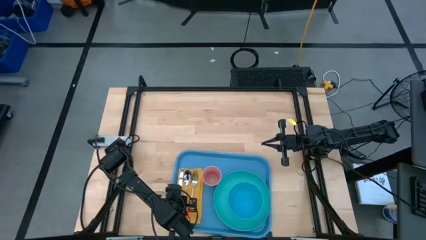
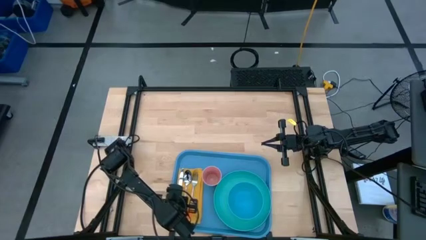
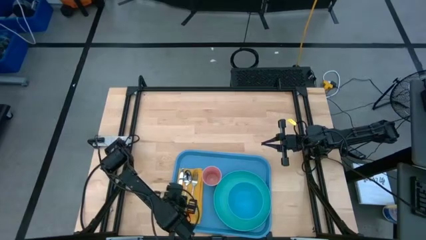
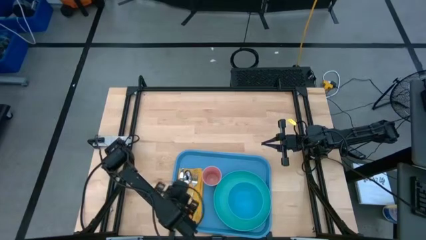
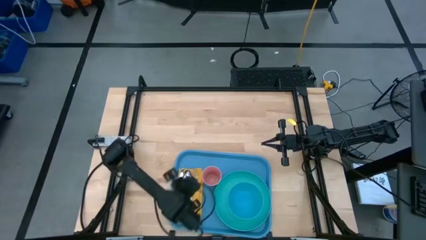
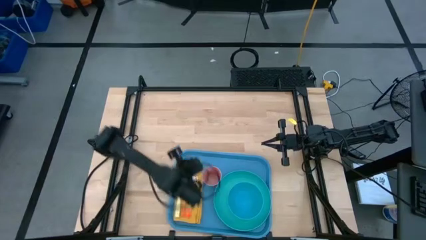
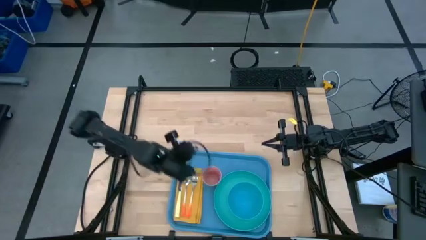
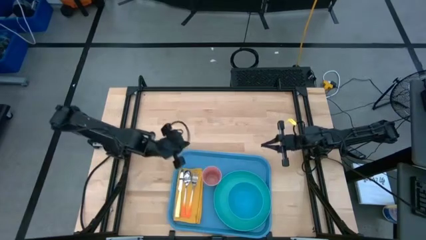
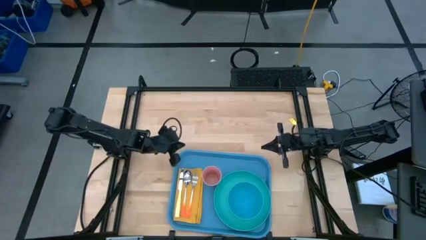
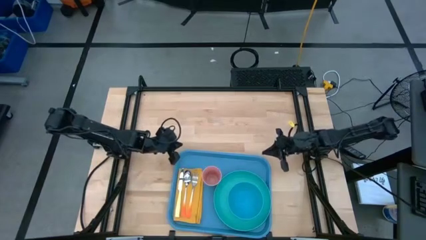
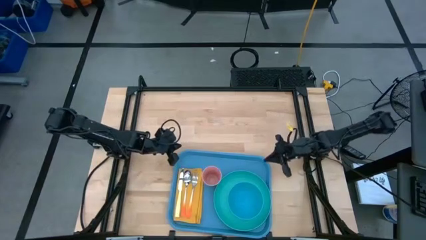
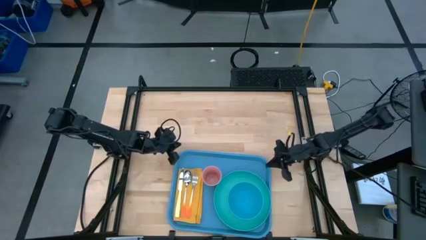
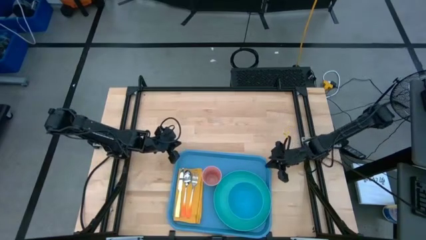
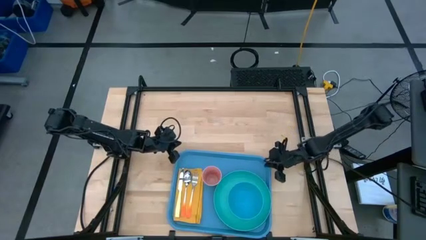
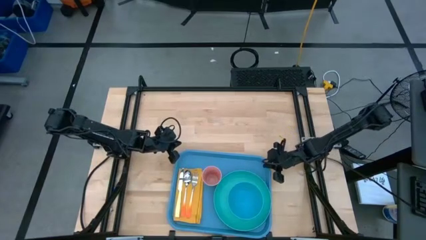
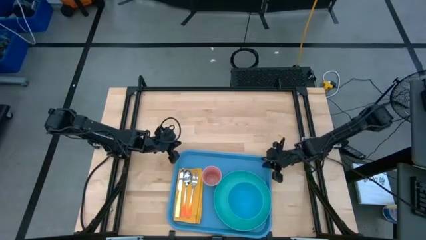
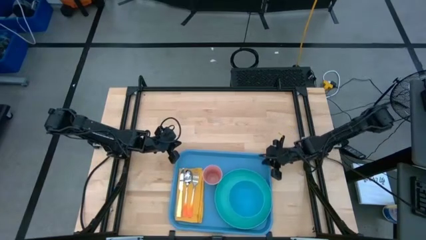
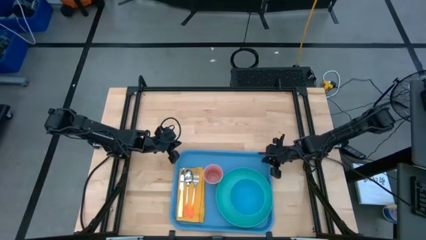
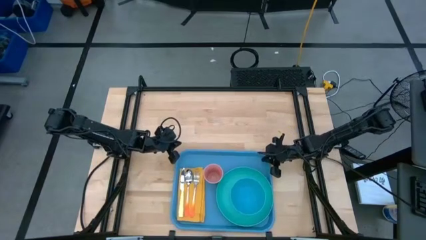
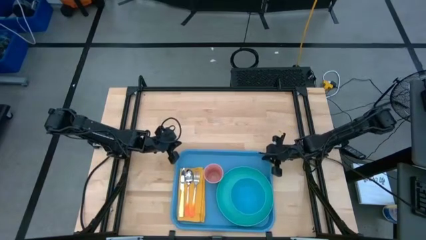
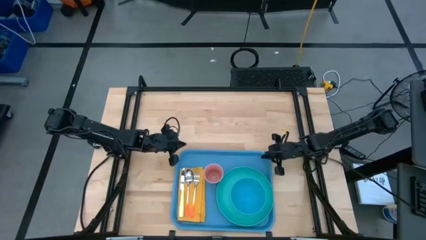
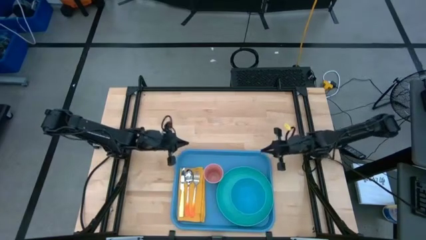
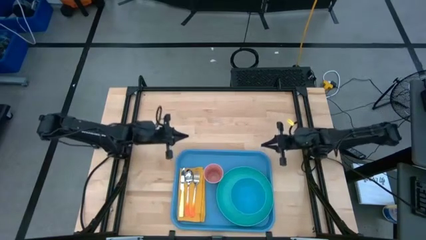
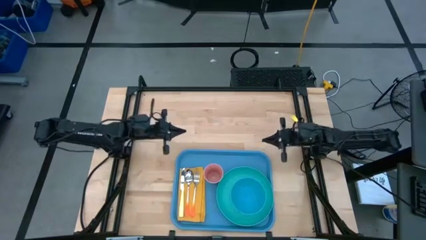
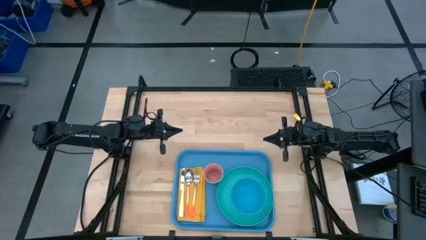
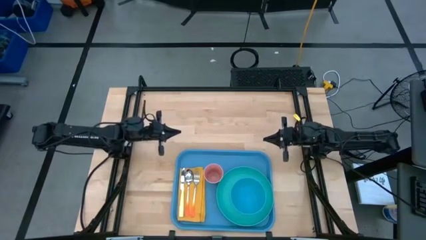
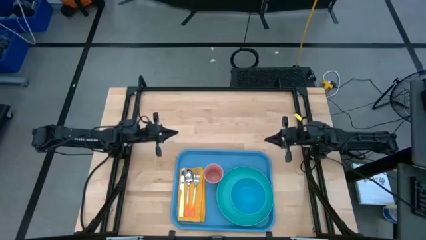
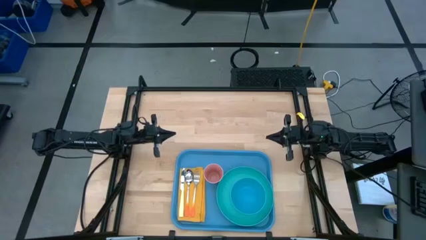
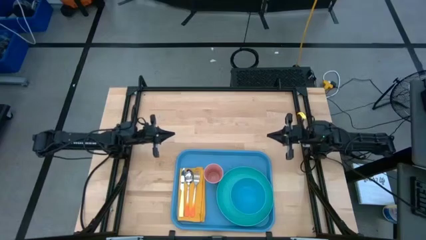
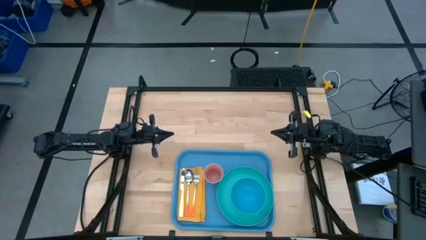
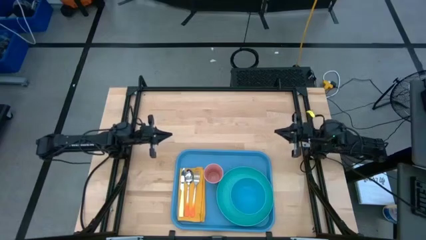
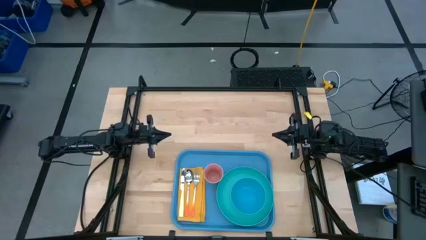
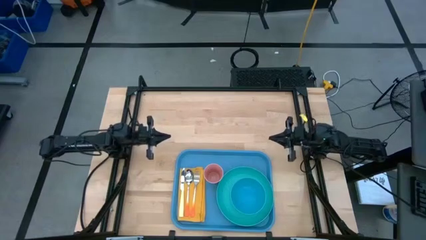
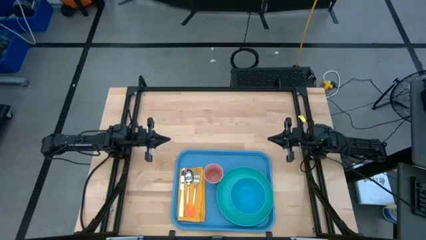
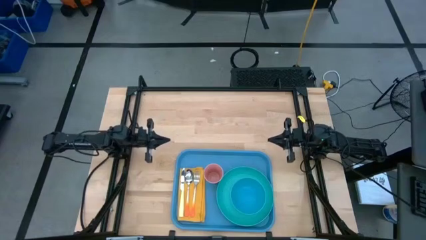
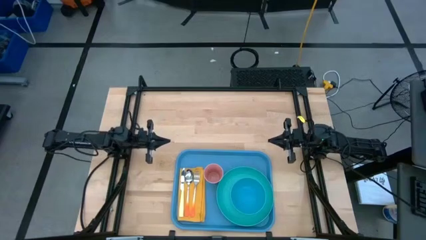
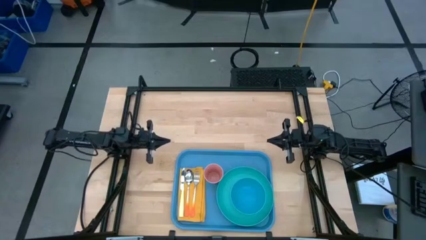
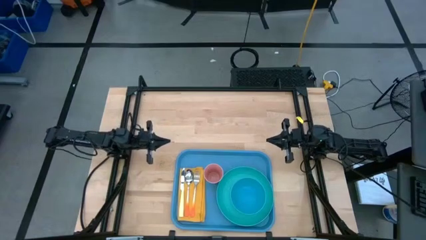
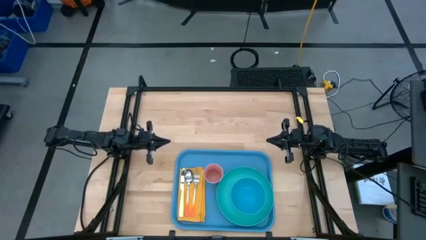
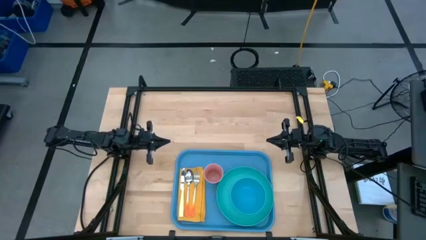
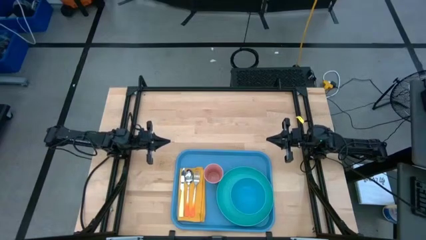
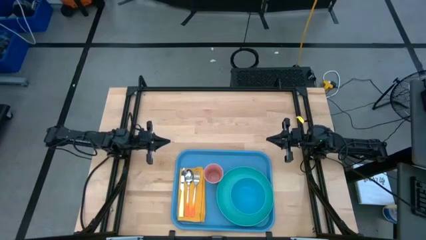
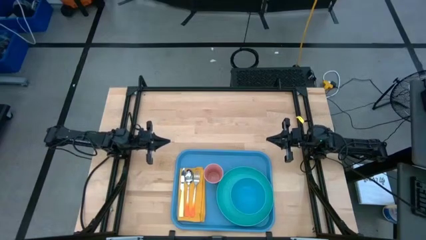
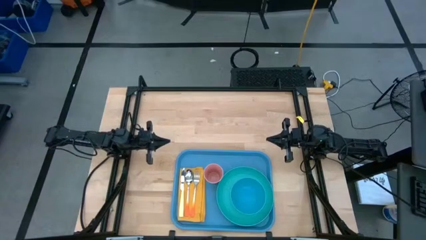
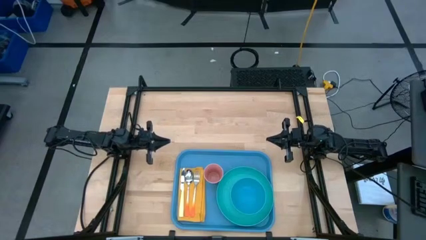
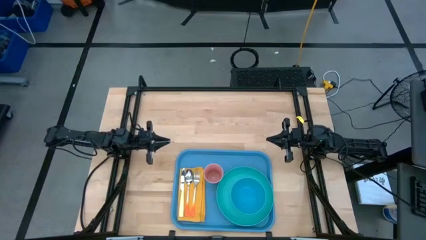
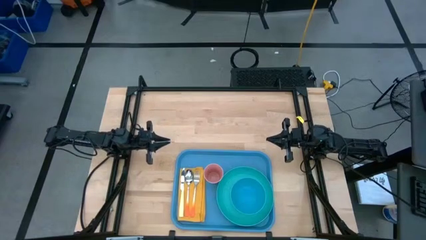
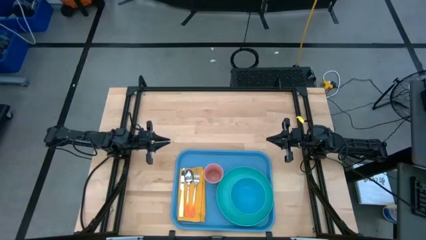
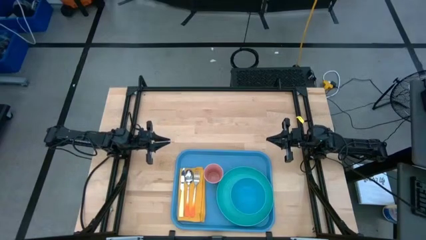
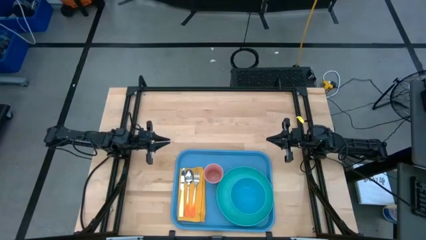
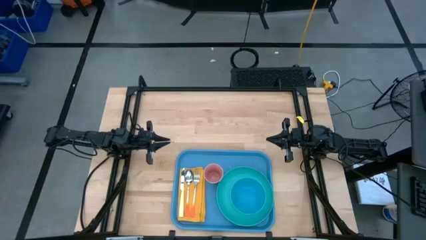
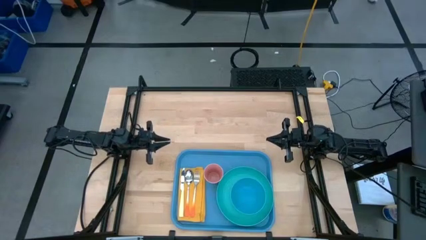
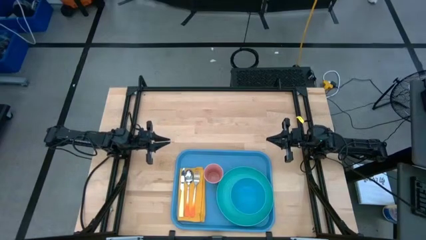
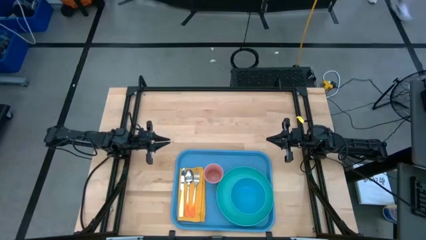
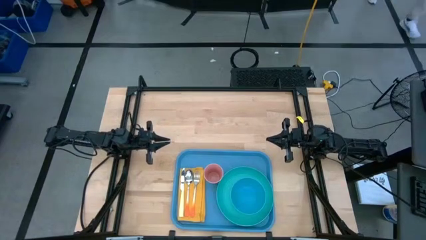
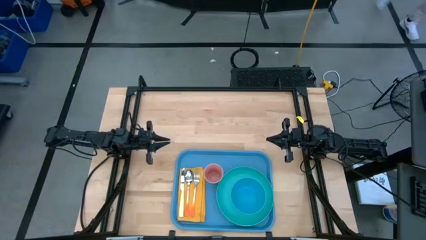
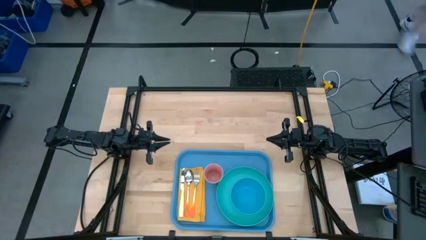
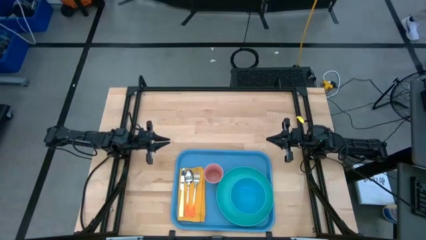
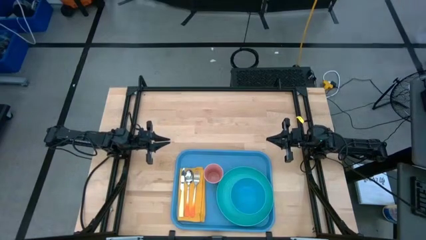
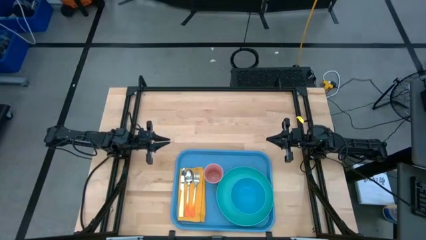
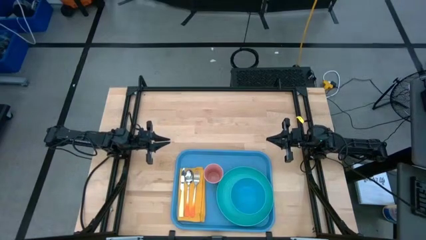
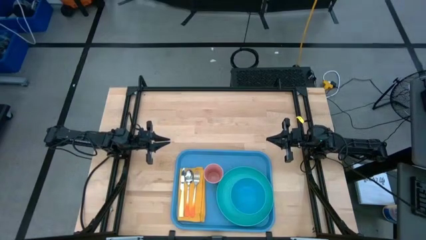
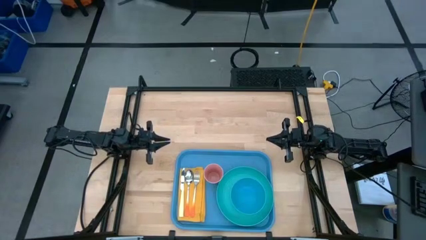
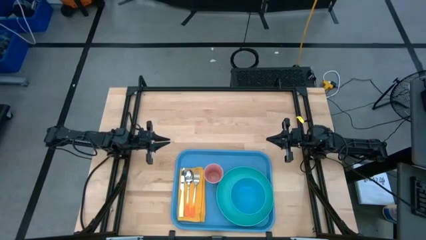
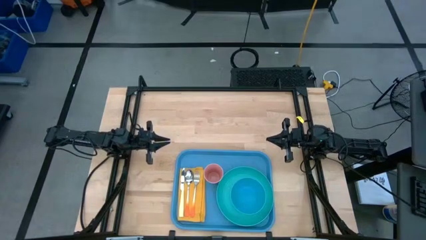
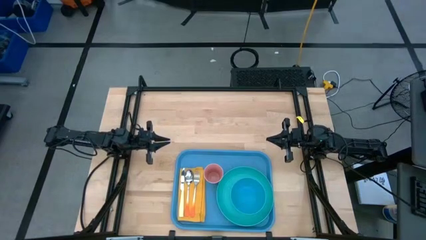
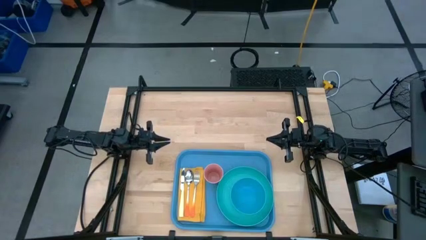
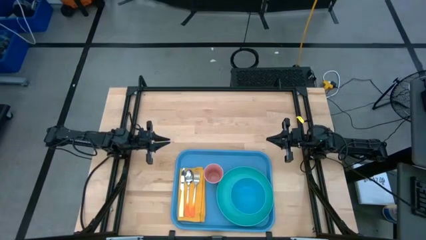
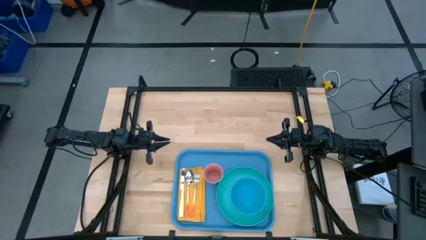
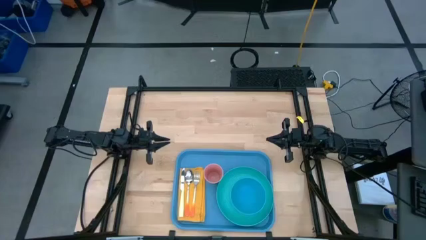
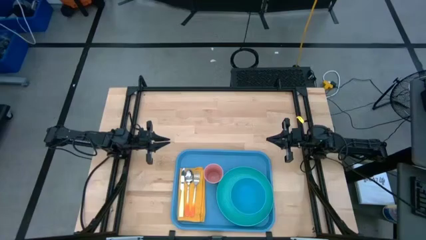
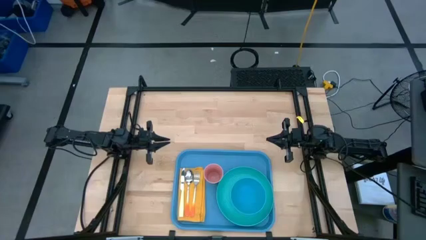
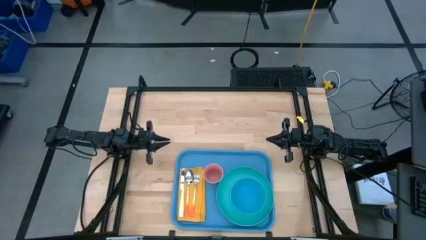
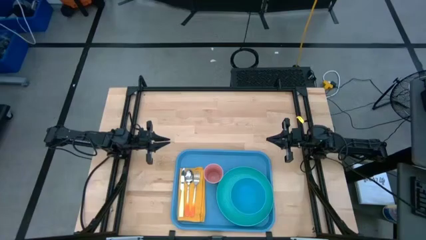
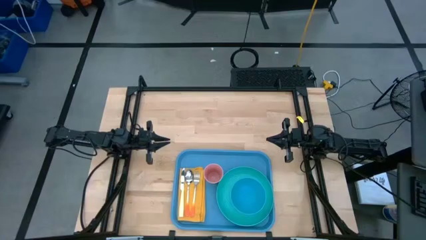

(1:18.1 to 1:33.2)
Task: Set up tray
Return to Home Position
